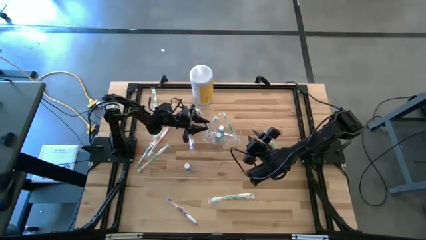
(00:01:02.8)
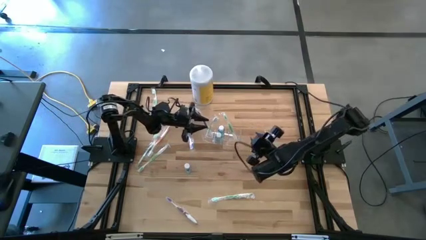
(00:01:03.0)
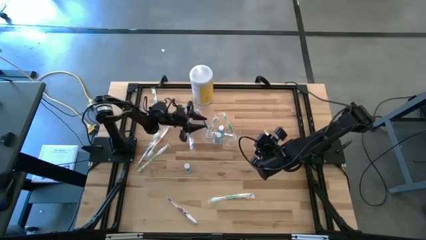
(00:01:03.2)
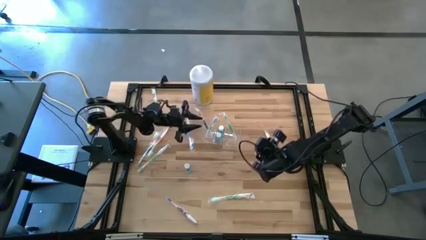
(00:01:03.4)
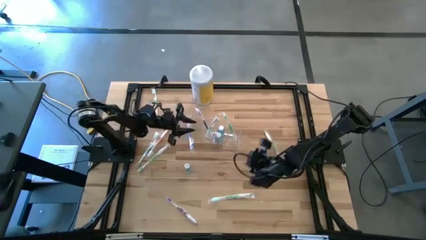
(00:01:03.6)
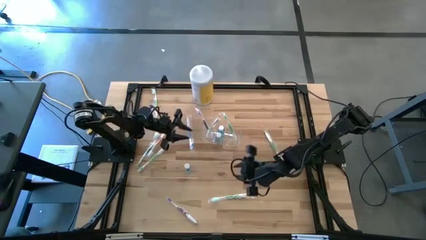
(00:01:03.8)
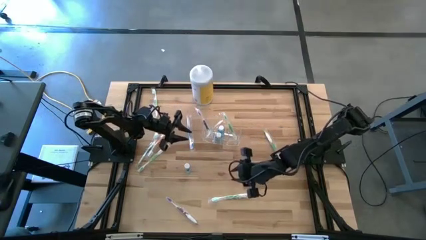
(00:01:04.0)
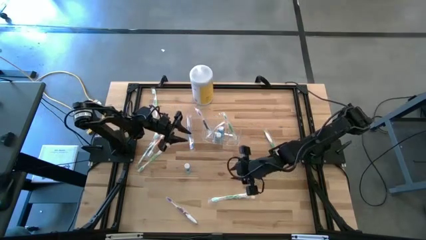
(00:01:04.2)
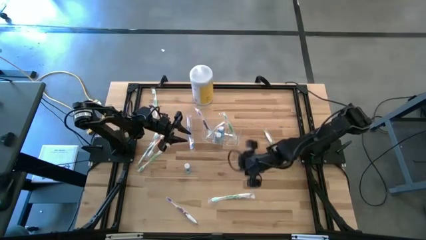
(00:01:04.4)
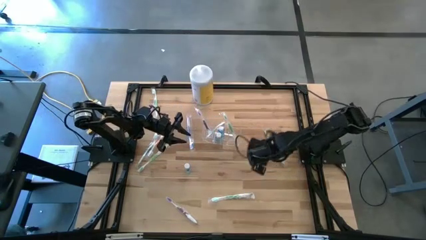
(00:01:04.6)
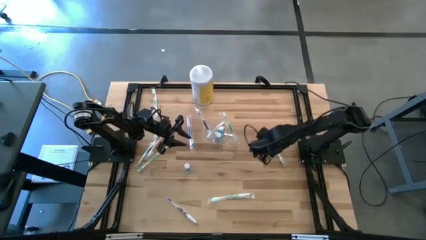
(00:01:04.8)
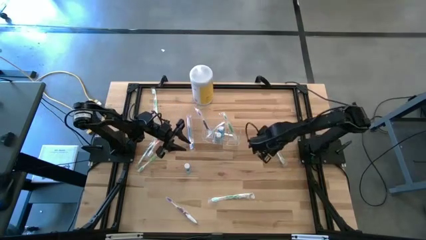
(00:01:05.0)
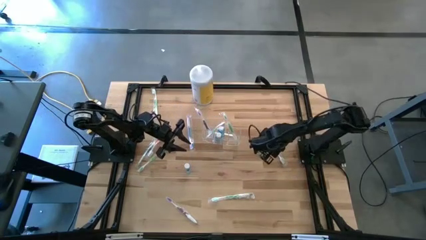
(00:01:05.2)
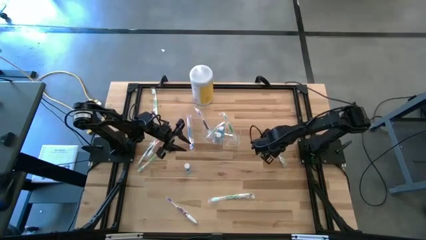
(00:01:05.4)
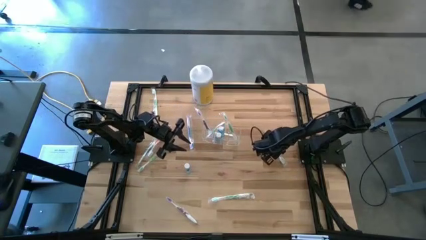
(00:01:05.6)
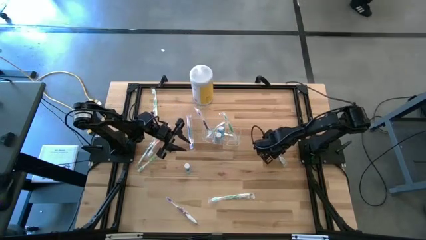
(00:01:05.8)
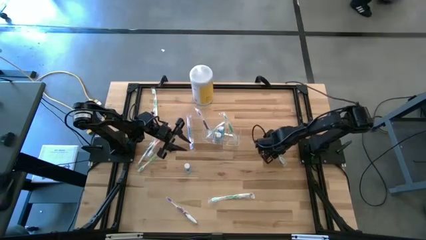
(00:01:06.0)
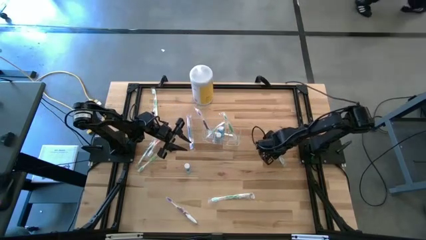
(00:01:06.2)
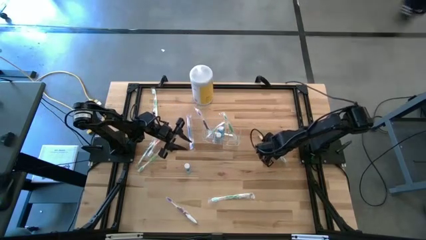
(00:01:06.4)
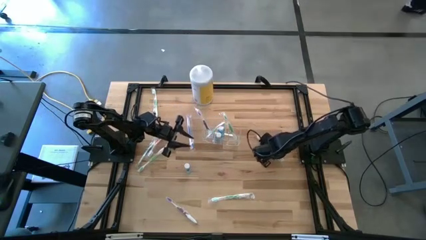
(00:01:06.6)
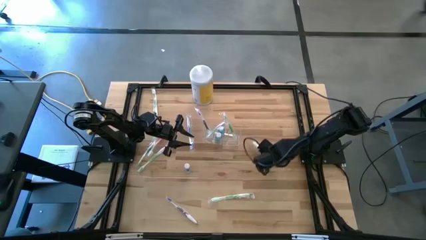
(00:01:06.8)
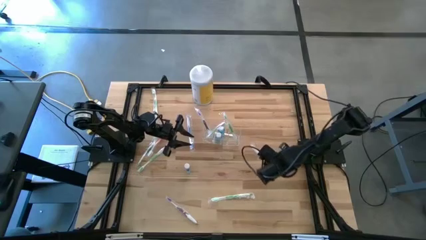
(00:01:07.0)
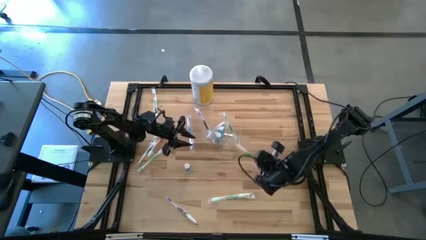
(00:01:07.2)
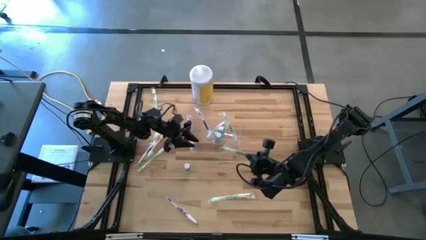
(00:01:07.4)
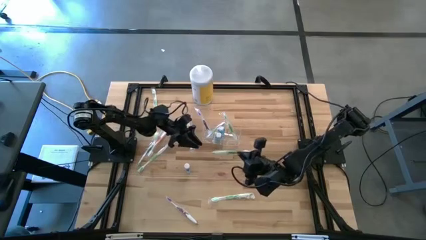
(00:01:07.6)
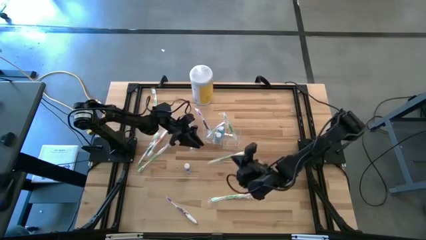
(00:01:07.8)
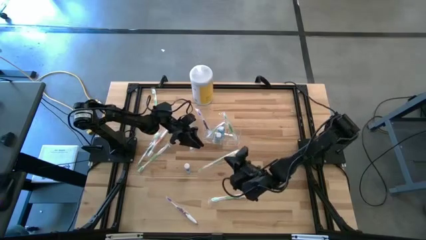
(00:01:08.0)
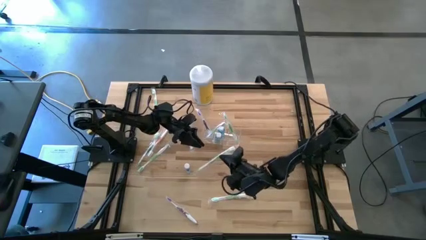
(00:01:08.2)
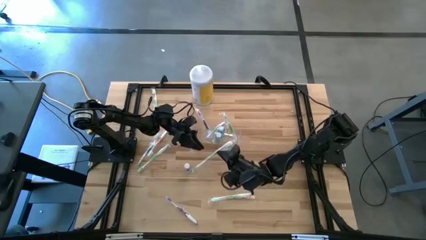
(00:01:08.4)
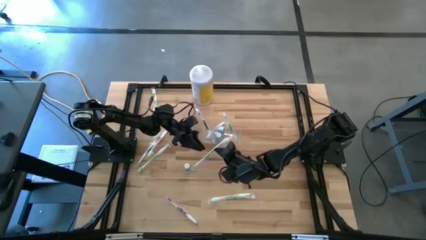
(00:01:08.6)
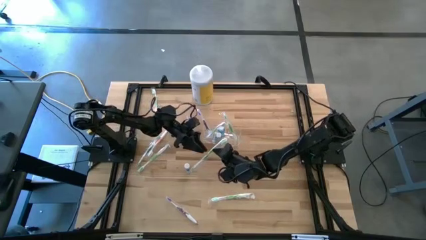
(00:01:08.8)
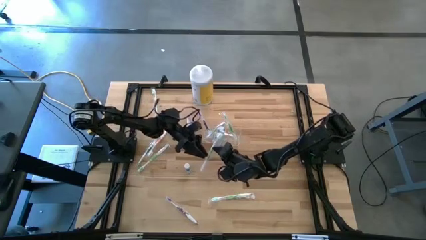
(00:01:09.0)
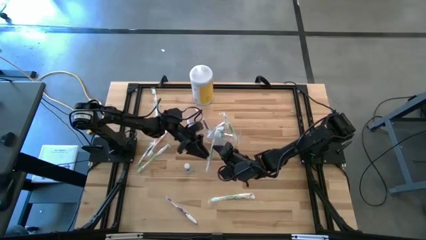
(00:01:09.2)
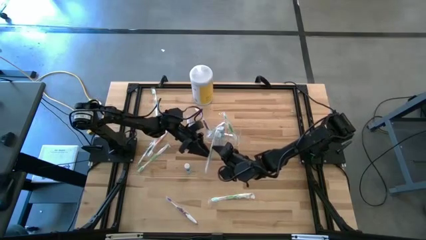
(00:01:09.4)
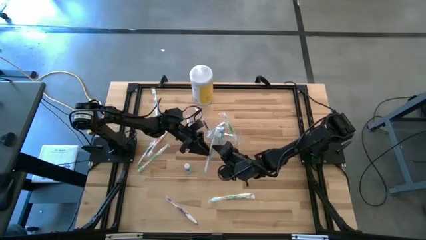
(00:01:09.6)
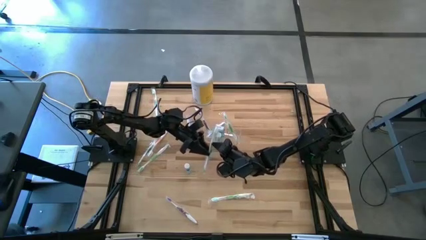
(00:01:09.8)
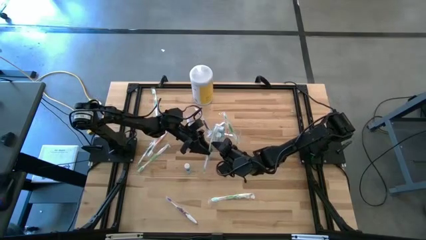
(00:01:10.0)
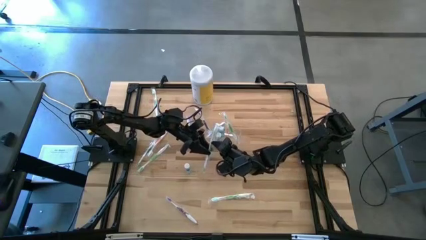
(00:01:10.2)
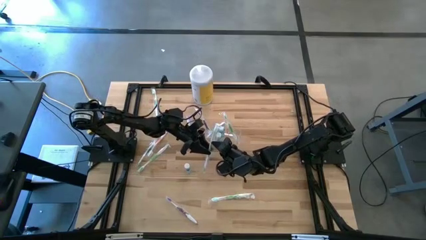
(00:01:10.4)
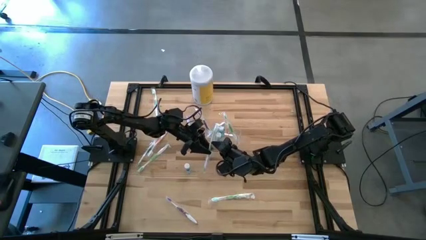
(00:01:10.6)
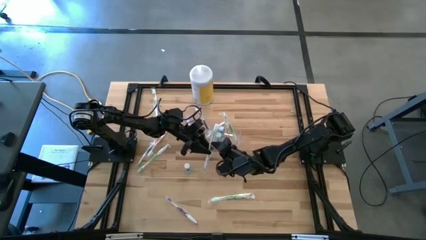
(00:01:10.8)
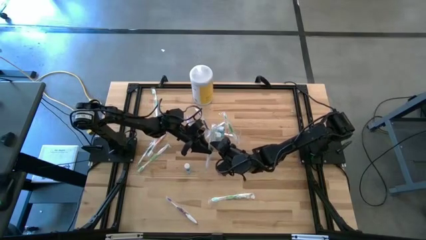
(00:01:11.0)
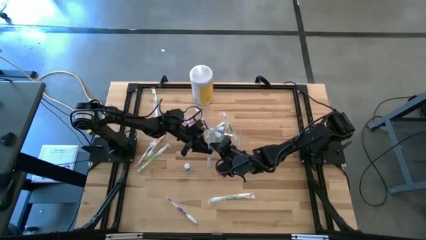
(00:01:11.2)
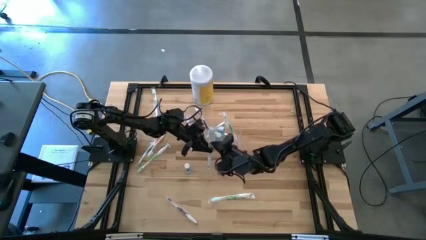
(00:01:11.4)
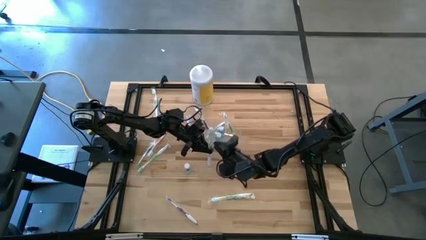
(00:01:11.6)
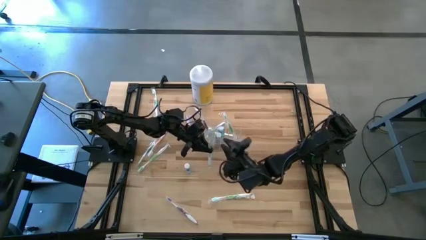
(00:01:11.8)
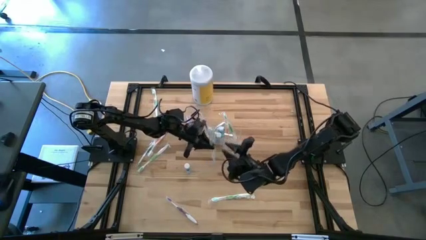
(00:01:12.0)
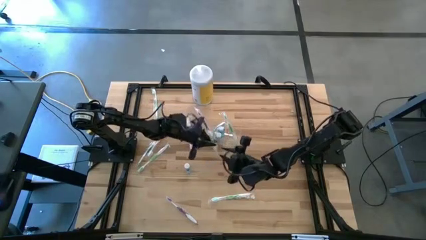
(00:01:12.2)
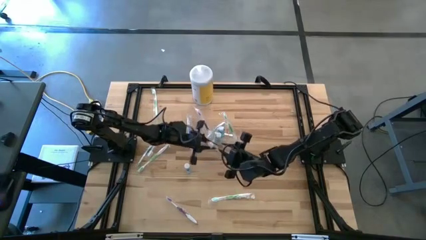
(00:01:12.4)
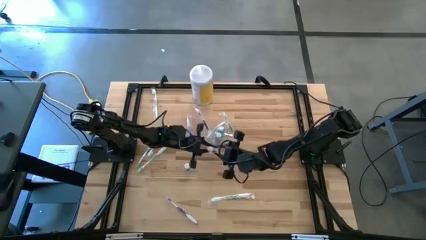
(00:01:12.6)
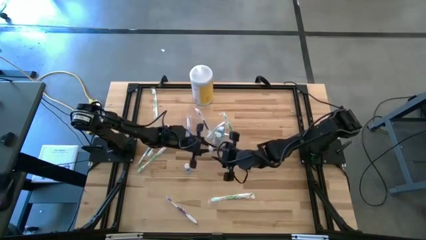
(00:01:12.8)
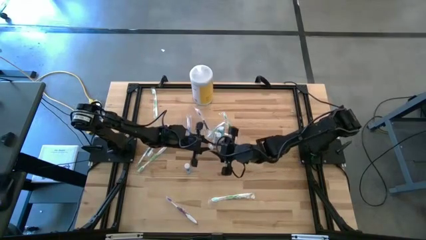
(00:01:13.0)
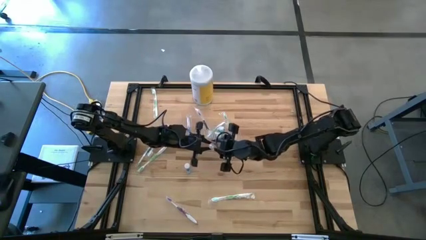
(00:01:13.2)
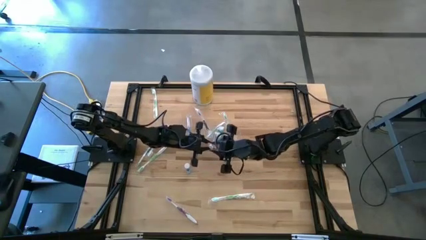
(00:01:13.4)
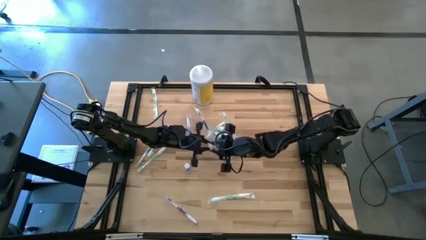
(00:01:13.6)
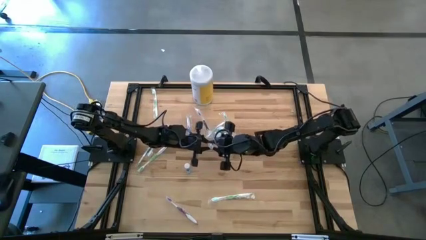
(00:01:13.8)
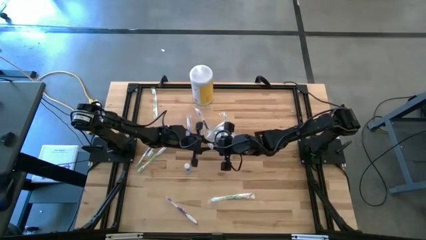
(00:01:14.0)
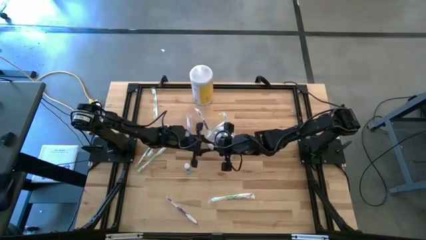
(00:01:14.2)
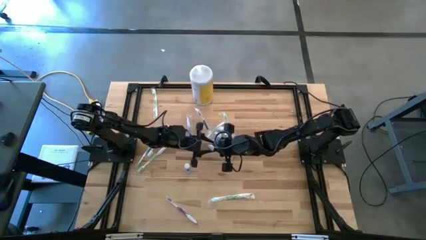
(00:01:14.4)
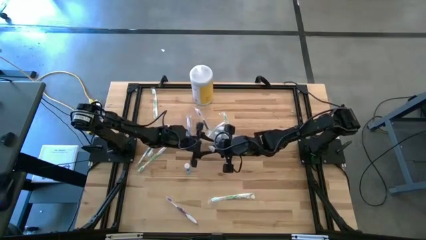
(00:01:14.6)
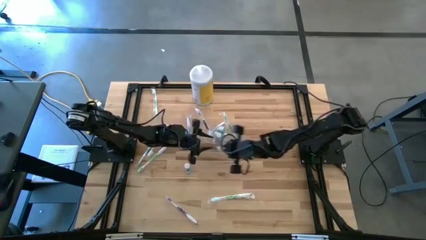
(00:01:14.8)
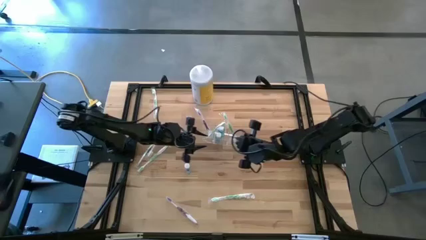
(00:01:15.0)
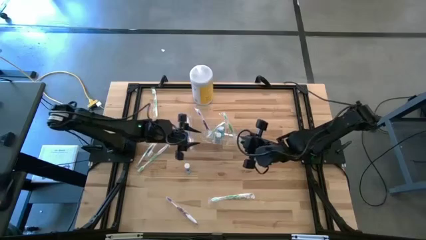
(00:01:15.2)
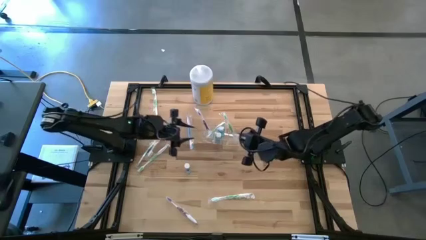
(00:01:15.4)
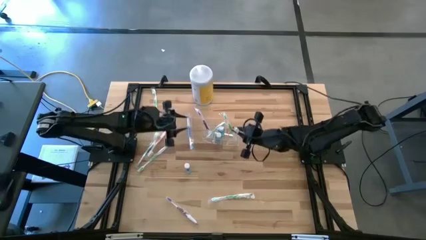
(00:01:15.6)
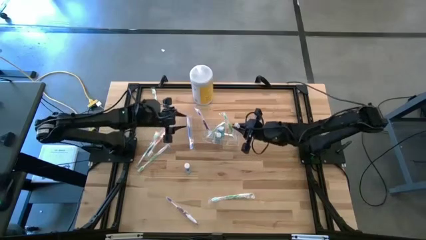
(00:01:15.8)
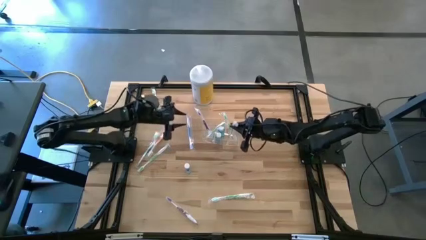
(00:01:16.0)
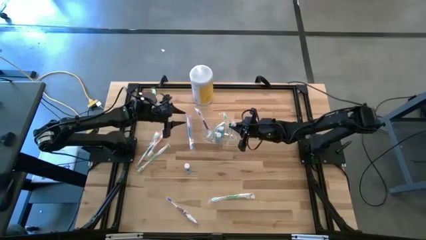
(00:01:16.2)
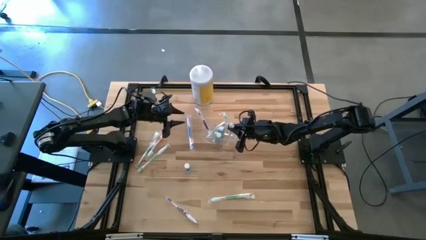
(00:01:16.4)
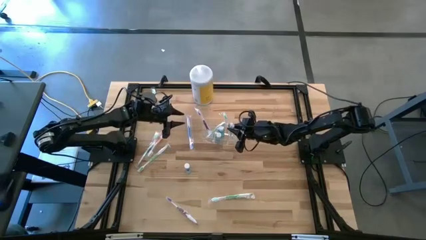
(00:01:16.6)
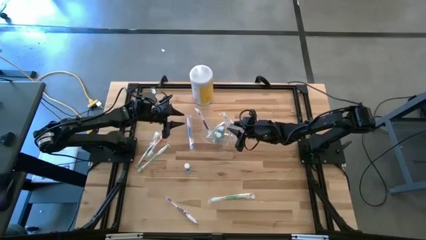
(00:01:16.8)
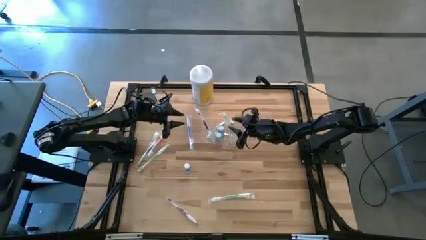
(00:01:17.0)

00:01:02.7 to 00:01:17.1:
Task: Pick & Place toothbrushing station
Put the green toothbrush into the right section of the transparent organizer
